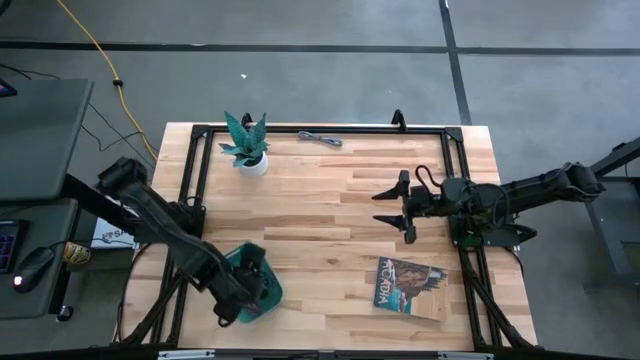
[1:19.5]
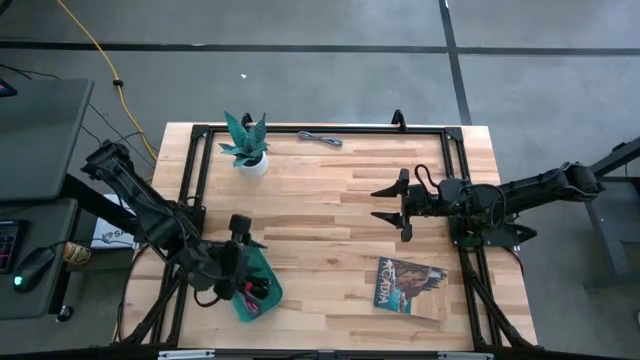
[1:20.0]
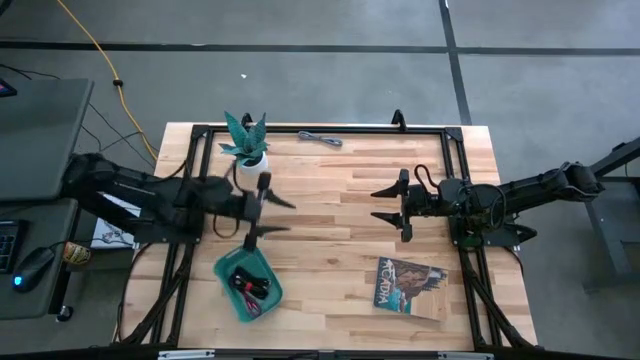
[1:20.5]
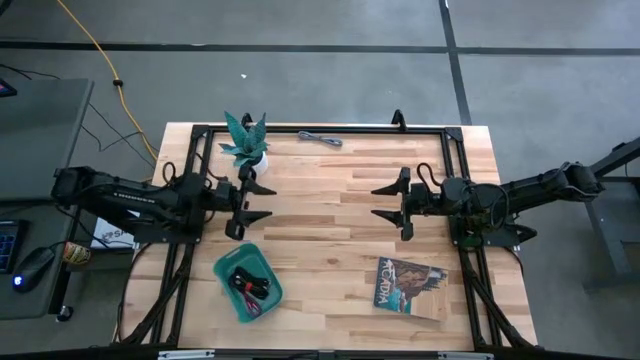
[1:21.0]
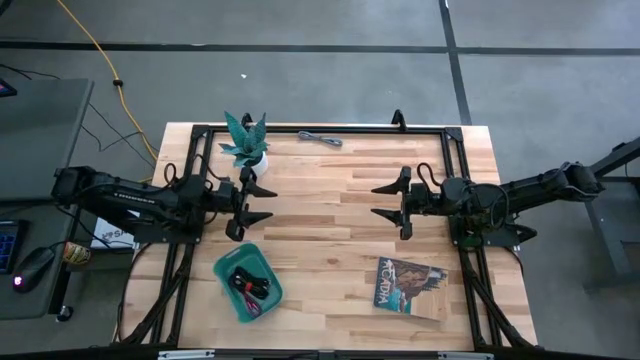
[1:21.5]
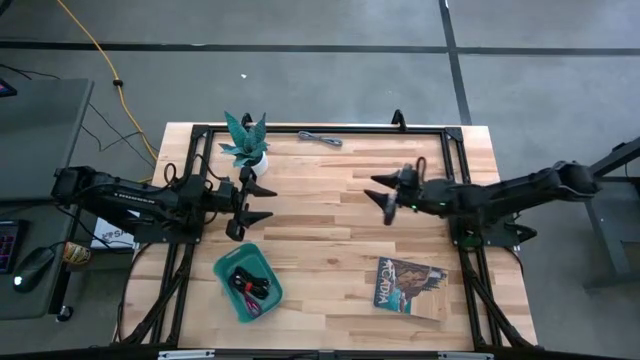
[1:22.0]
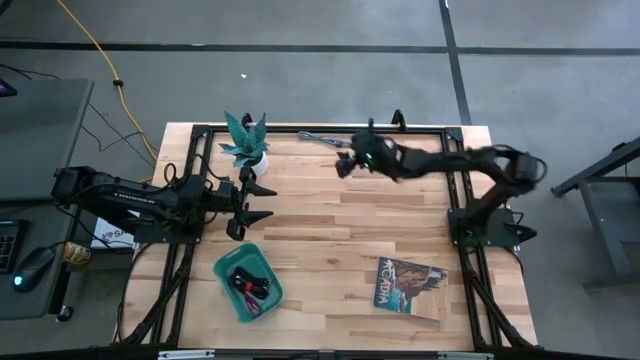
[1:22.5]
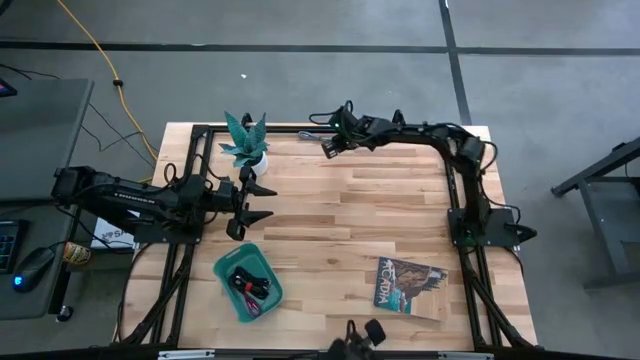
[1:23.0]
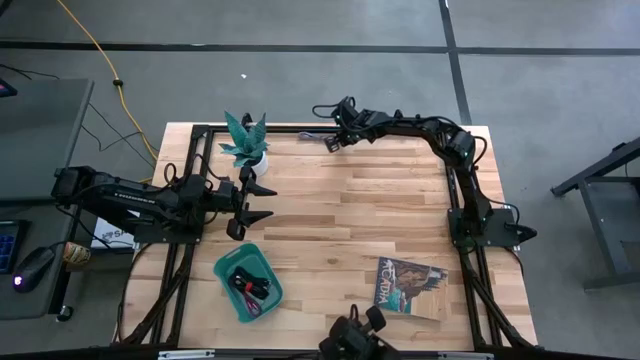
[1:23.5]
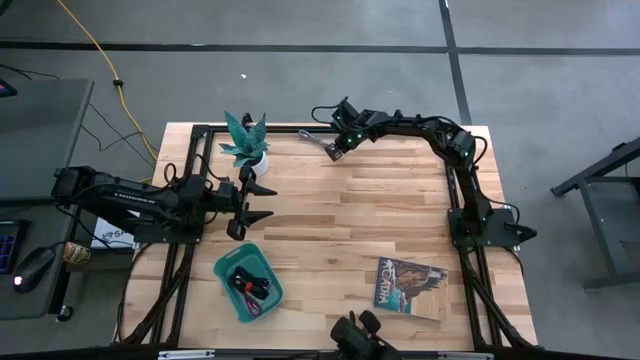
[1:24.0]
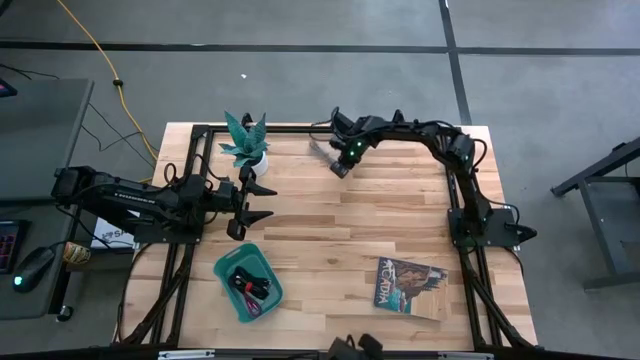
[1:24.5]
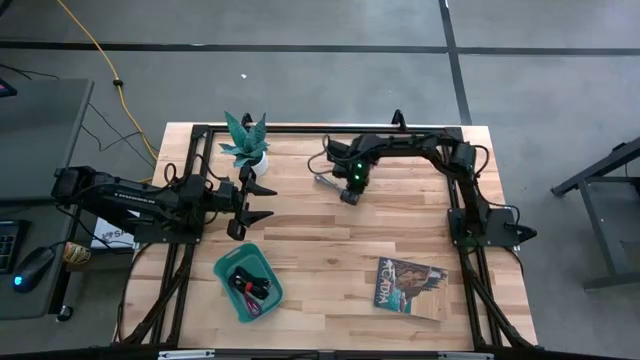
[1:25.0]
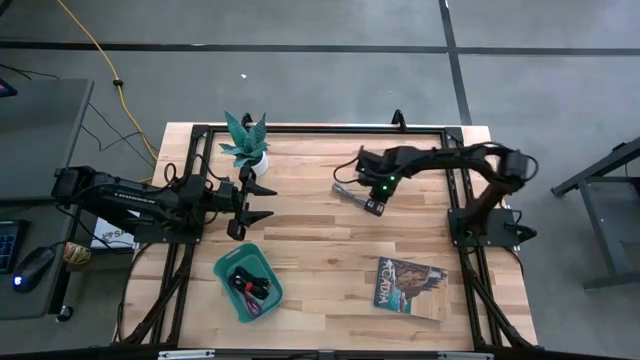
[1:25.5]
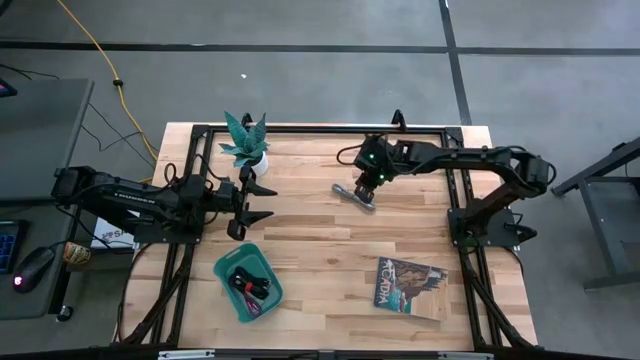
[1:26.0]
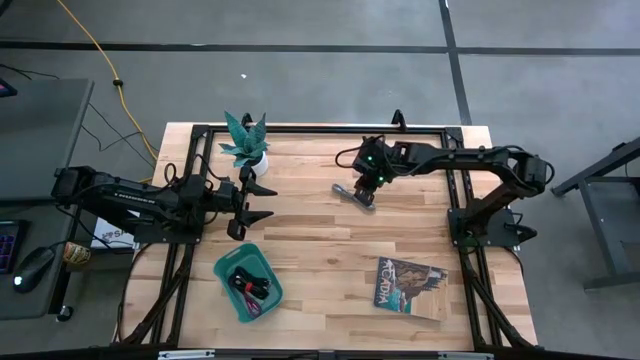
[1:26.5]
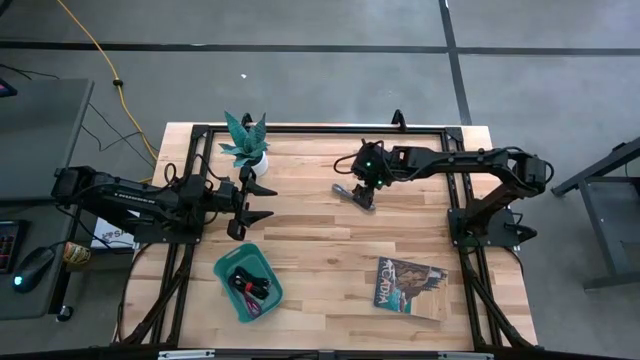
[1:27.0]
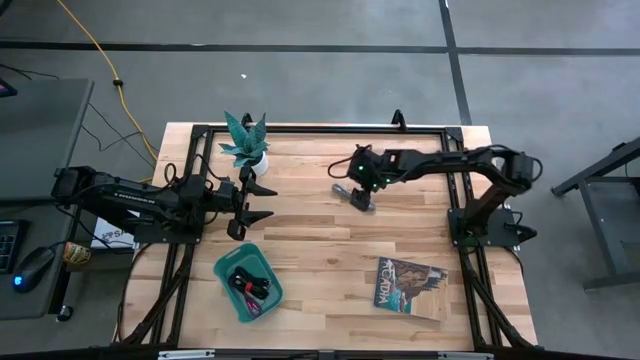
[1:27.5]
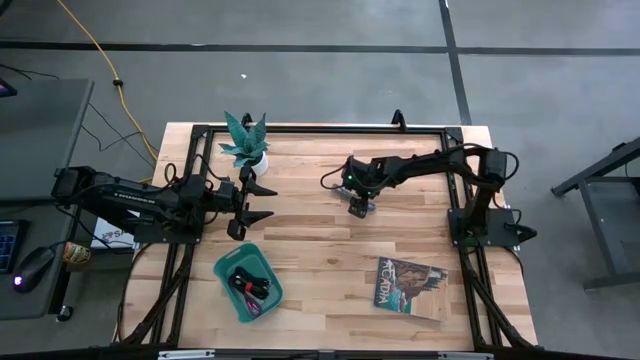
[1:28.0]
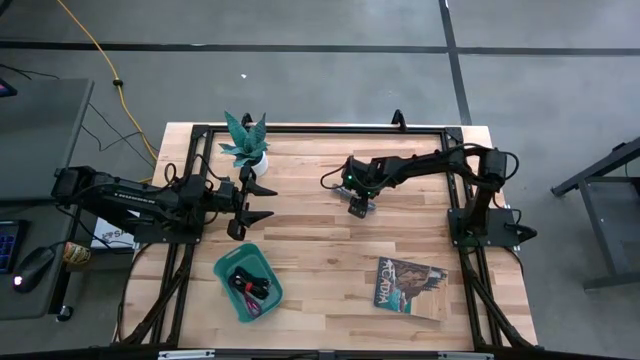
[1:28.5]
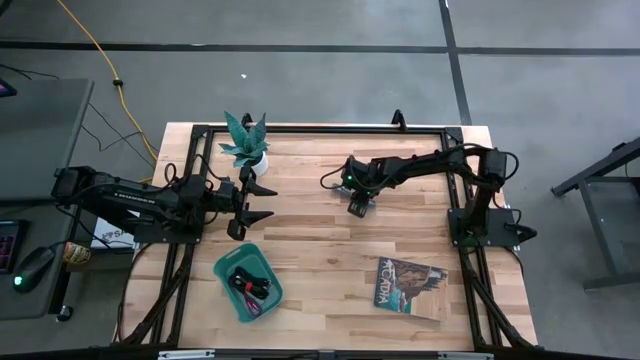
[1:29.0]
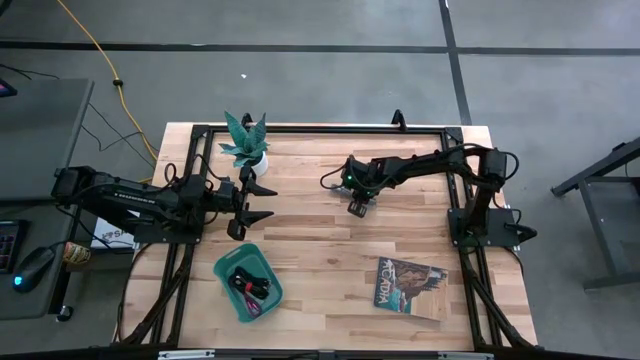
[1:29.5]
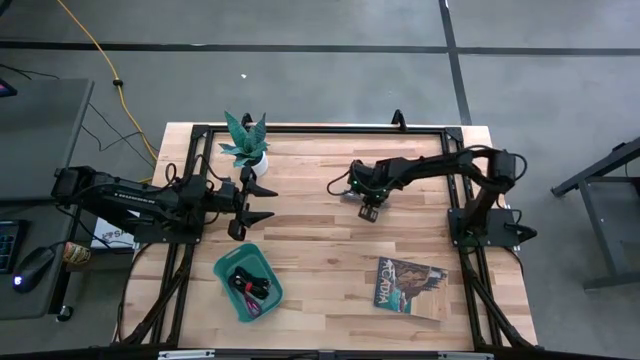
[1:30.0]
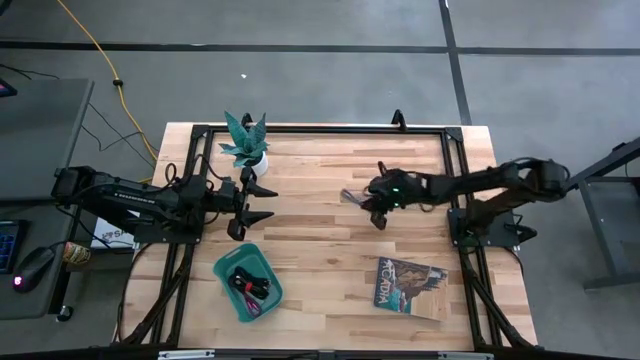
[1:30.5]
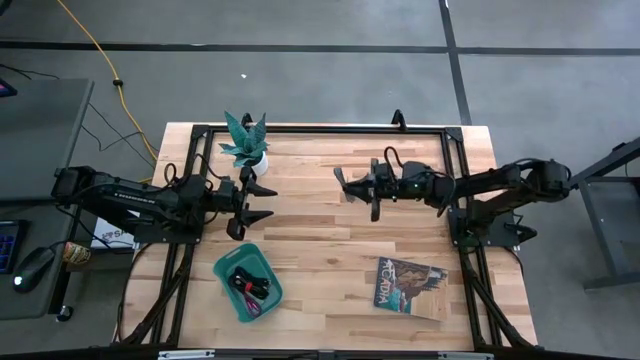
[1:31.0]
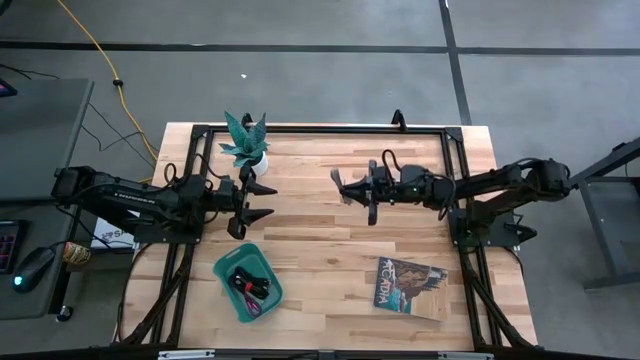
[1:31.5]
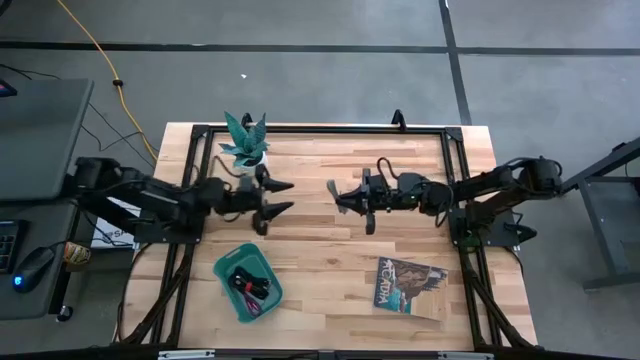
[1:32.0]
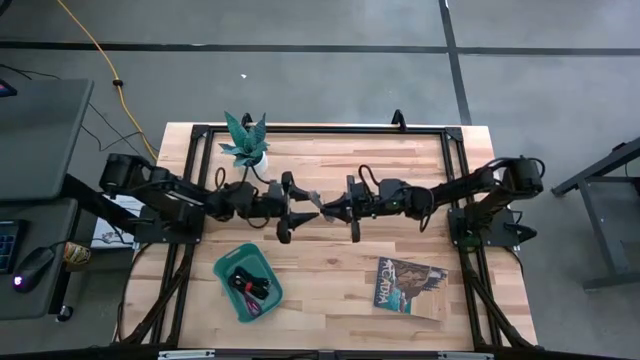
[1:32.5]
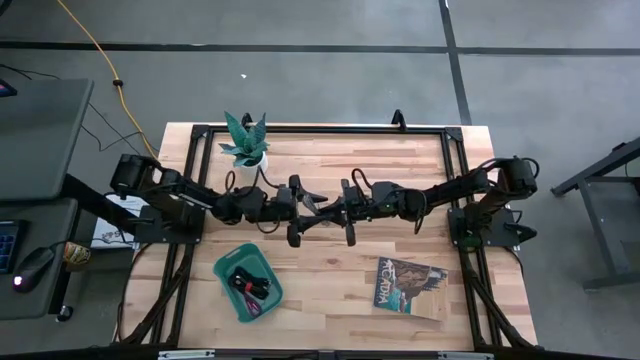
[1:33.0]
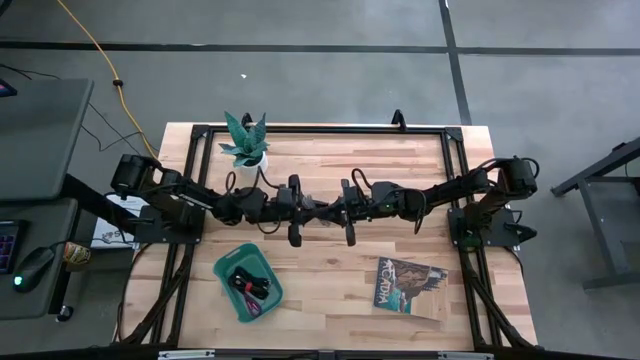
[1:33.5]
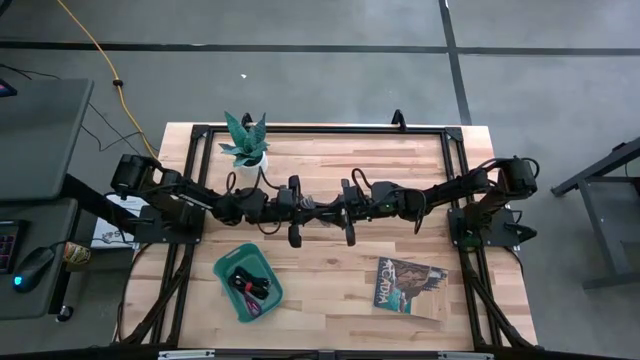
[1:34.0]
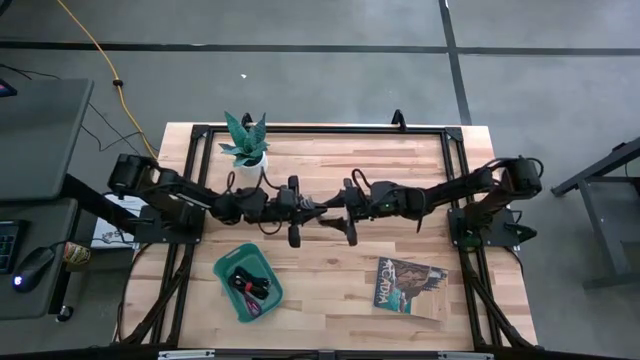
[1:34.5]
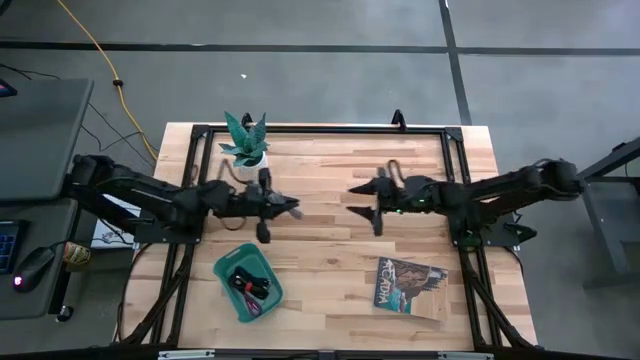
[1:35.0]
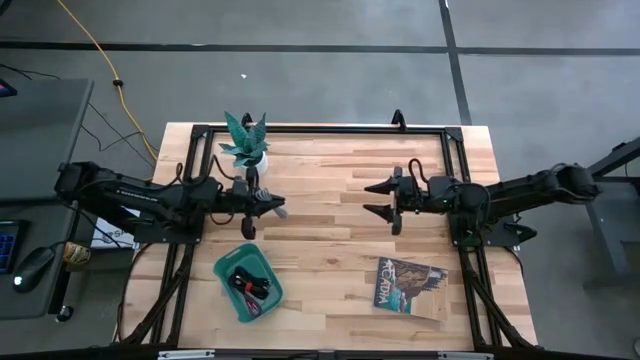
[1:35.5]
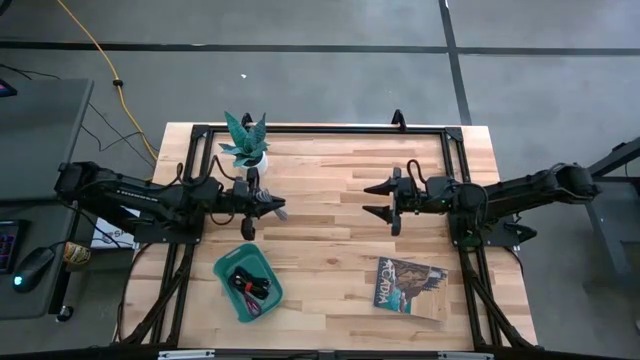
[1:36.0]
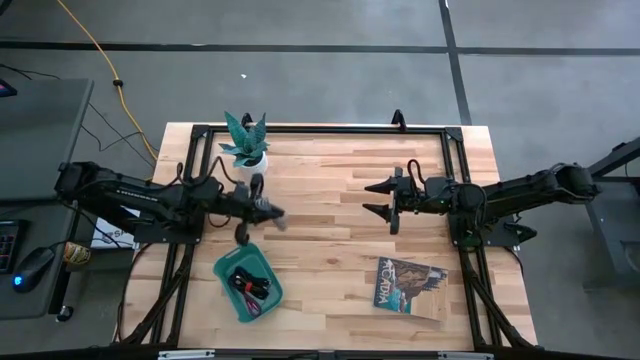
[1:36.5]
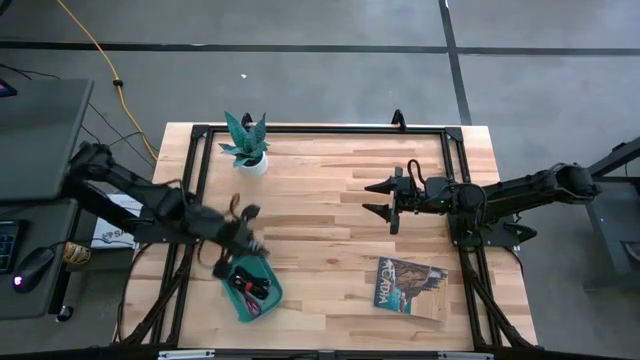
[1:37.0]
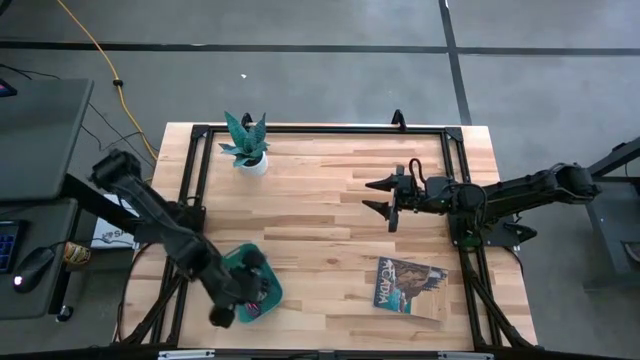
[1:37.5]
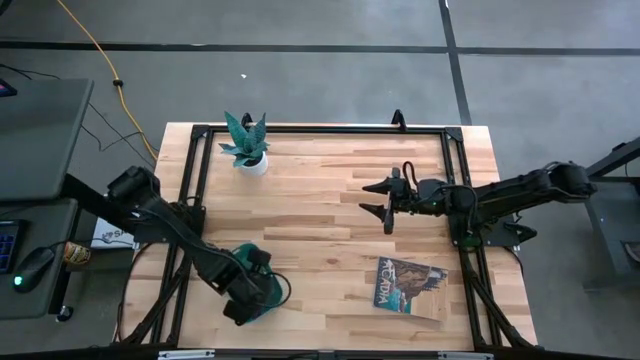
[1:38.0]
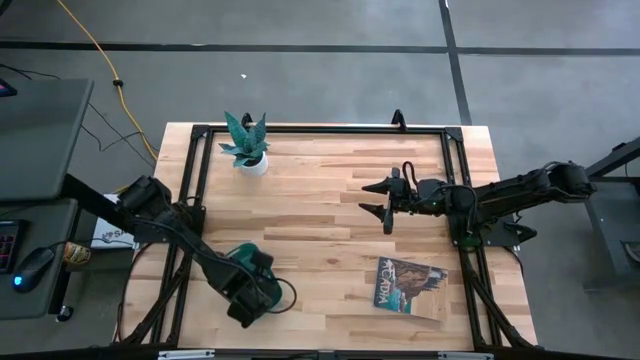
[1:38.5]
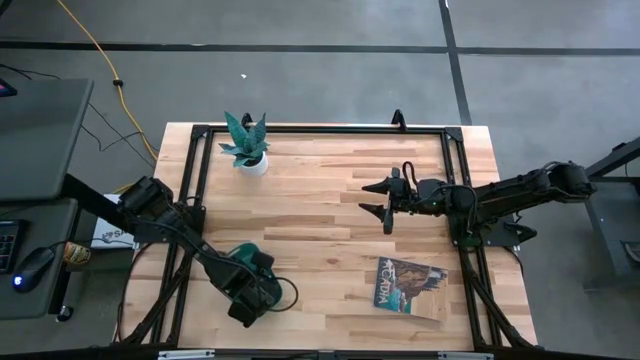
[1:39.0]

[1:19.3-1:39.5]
Task: Pick and place USB-C Cables
Put the white stripe USB cable into the green bin

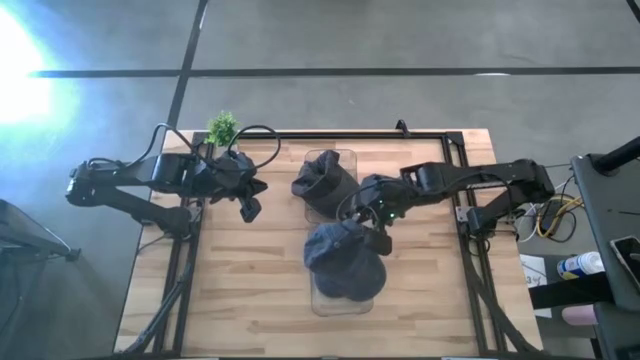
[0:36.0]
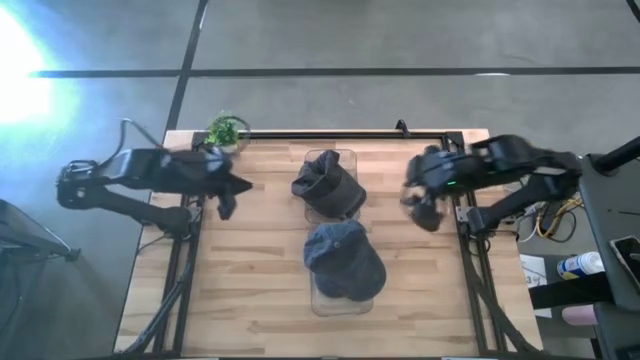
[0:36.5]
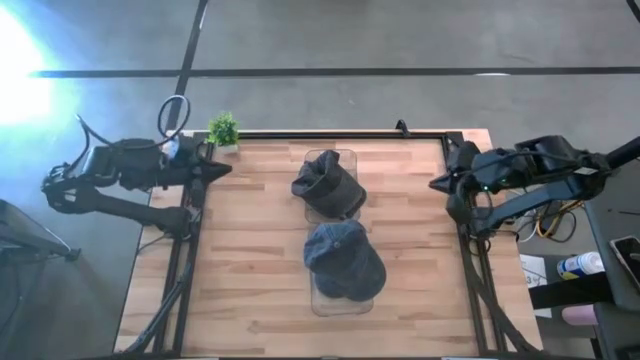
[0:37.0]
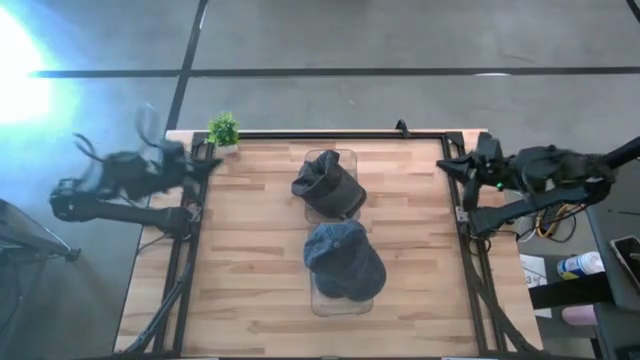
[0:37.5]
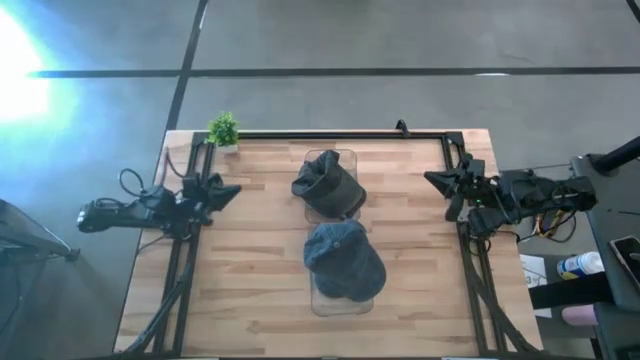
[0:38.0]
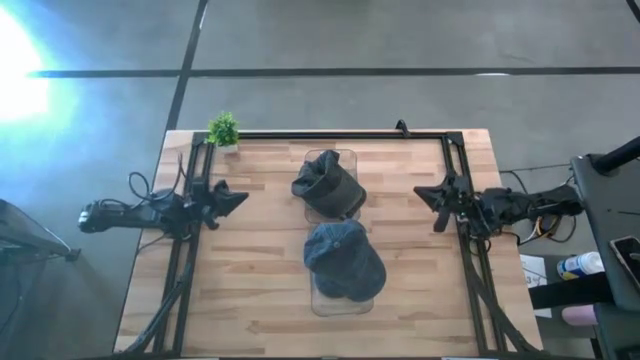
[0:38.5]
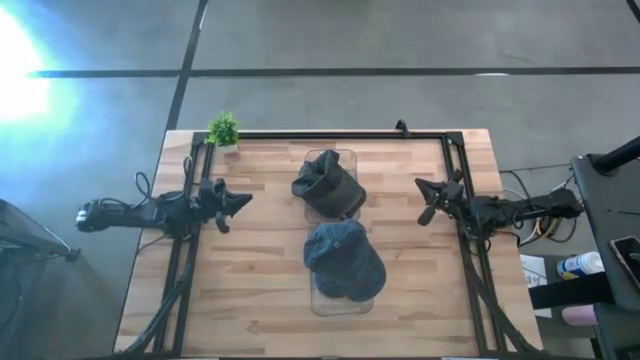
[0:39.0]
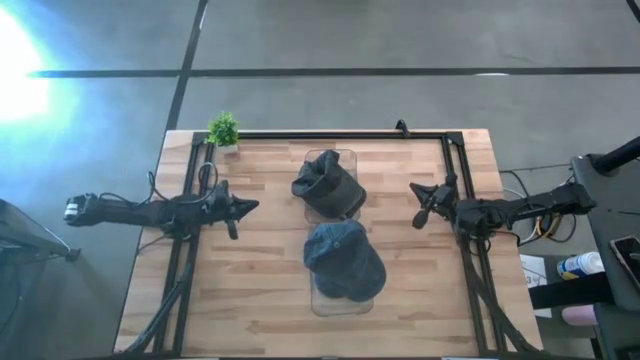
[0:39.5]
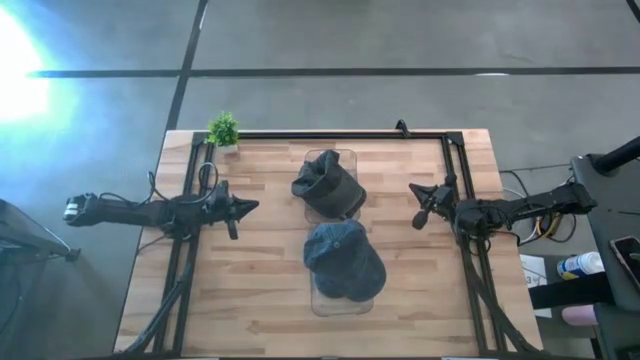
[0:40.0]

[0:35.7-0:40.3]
Task: Pick & Place hat
Return to Home Position
